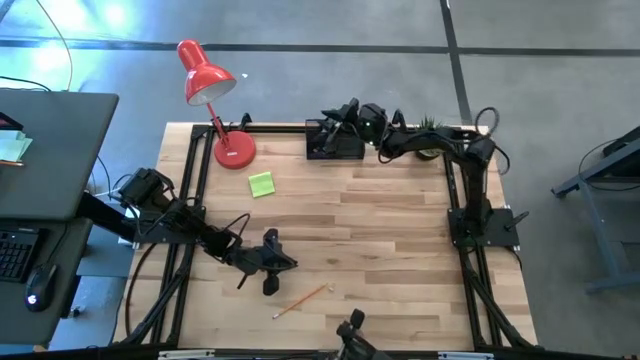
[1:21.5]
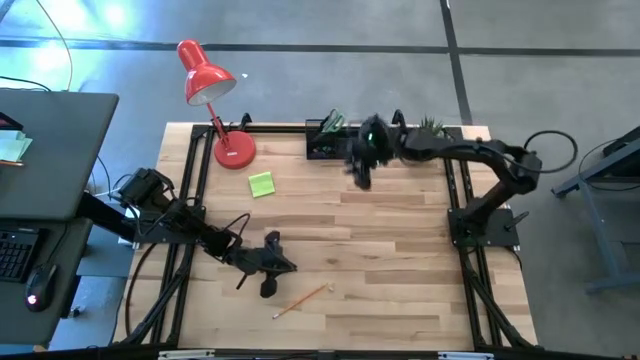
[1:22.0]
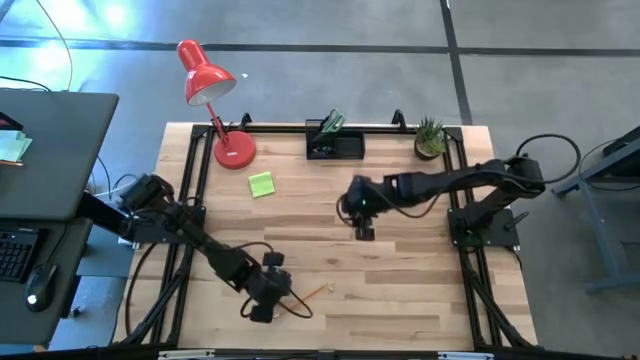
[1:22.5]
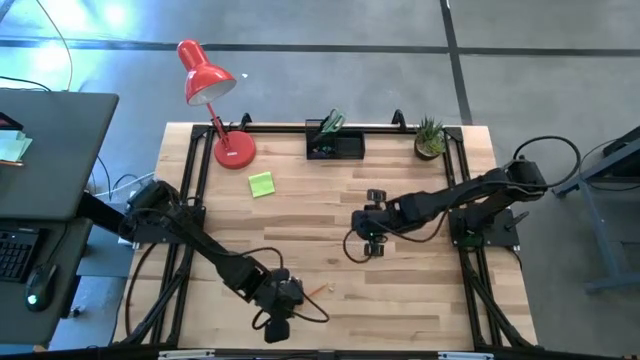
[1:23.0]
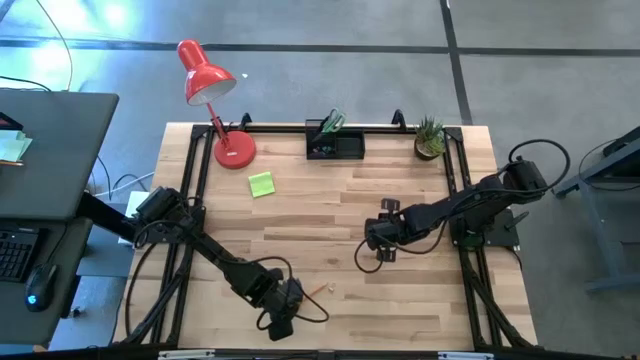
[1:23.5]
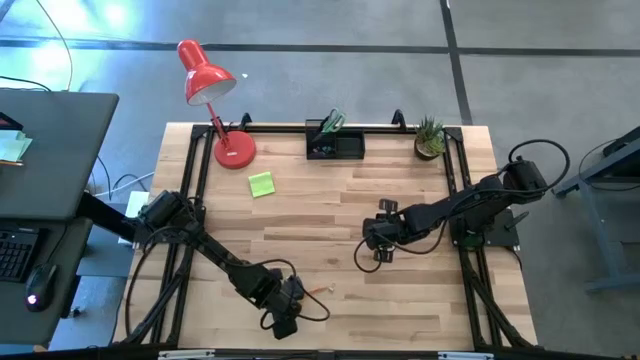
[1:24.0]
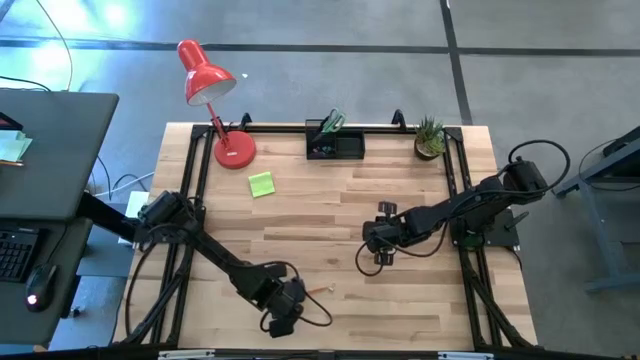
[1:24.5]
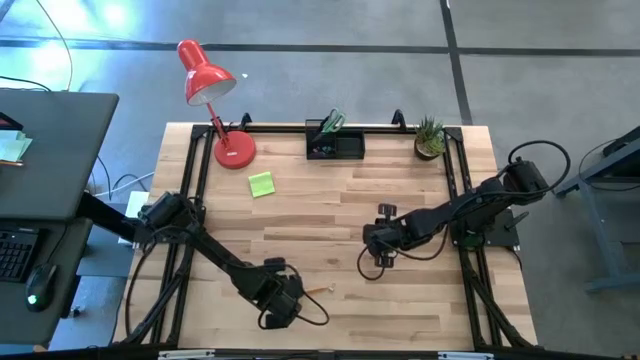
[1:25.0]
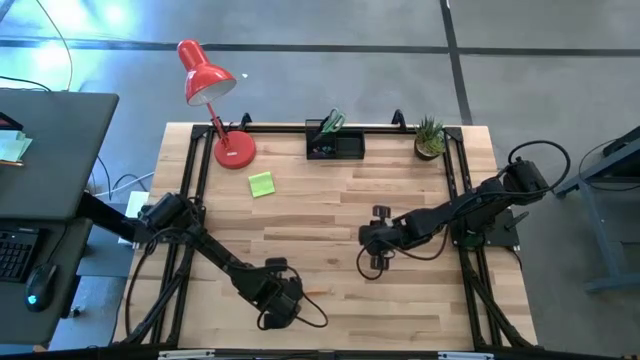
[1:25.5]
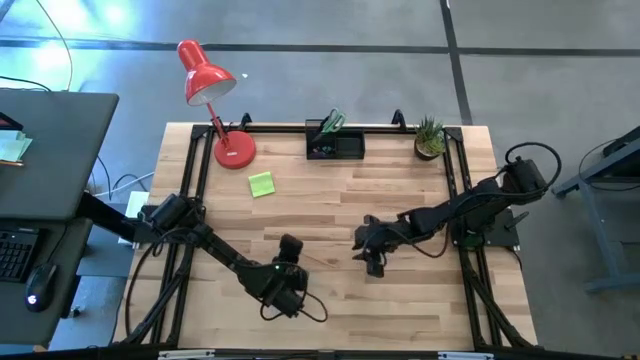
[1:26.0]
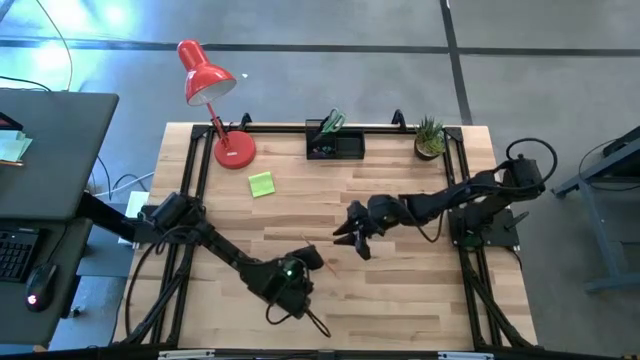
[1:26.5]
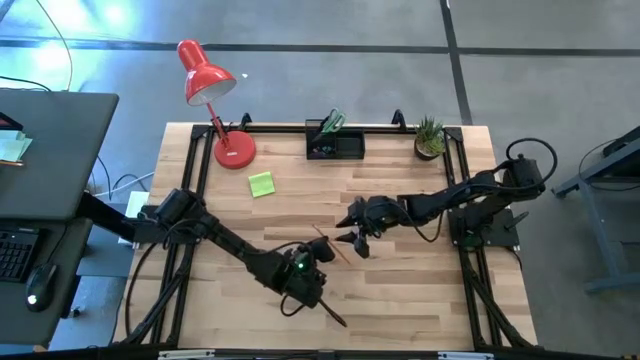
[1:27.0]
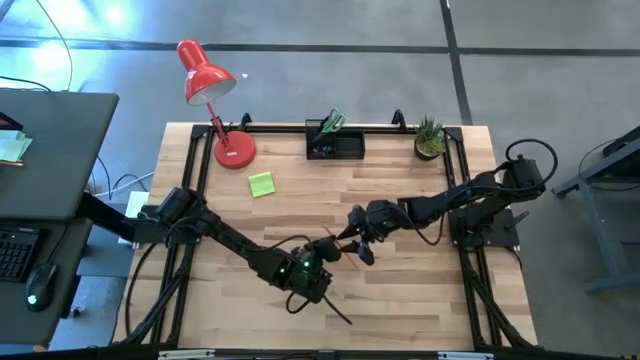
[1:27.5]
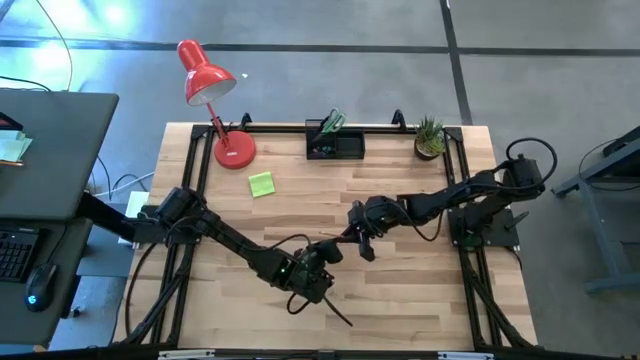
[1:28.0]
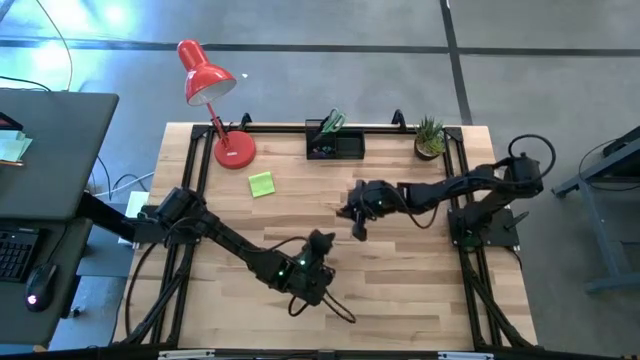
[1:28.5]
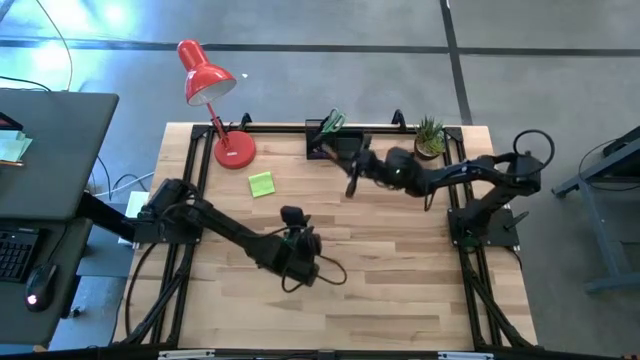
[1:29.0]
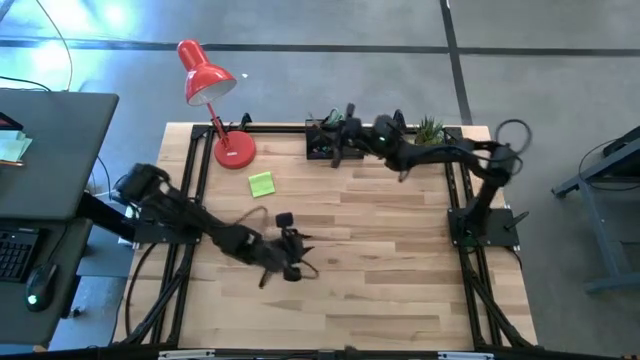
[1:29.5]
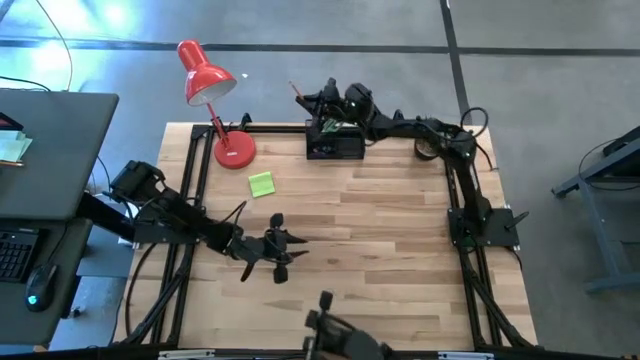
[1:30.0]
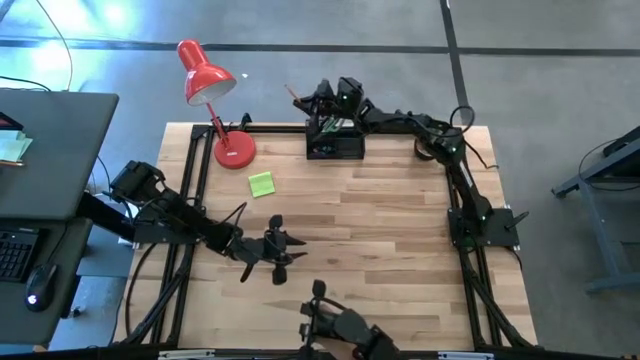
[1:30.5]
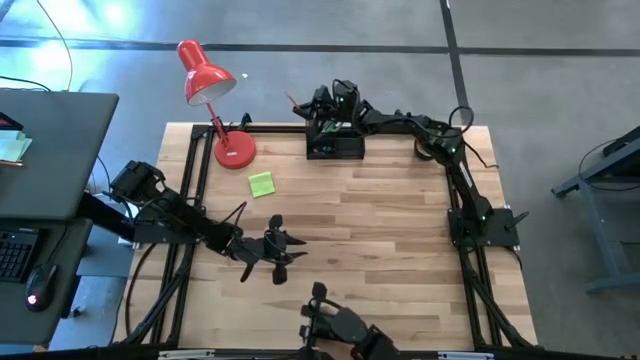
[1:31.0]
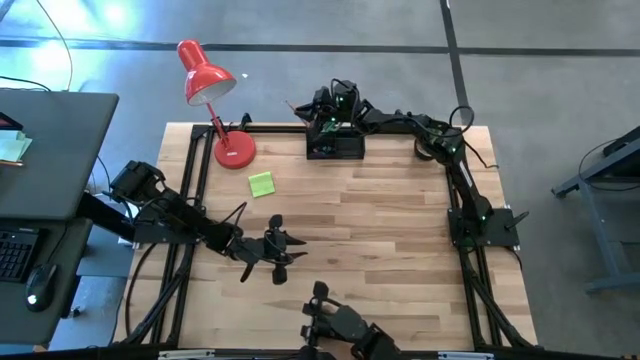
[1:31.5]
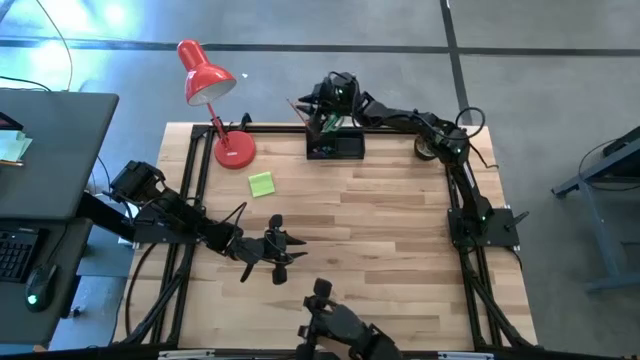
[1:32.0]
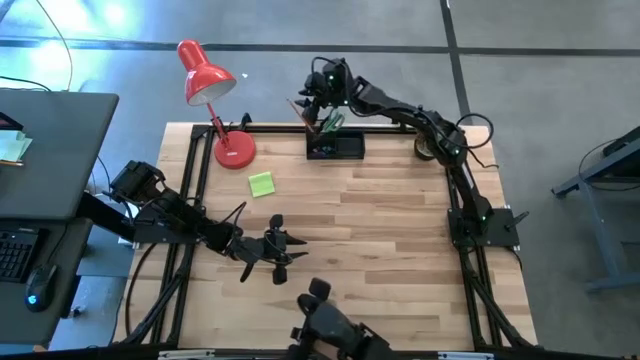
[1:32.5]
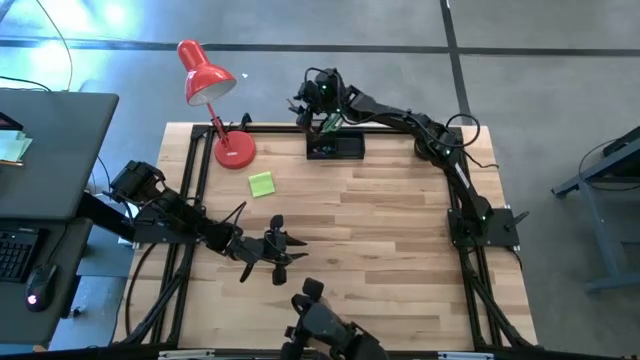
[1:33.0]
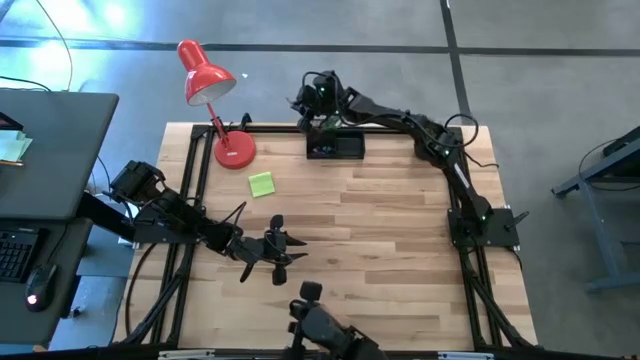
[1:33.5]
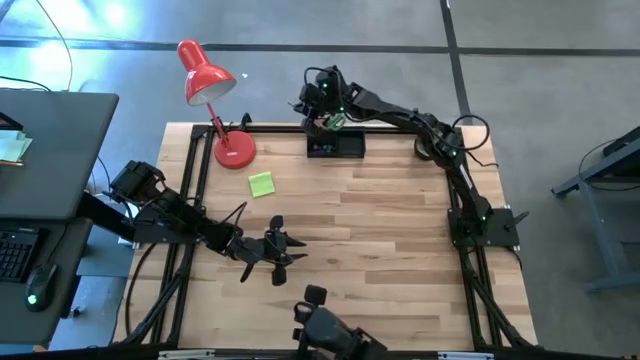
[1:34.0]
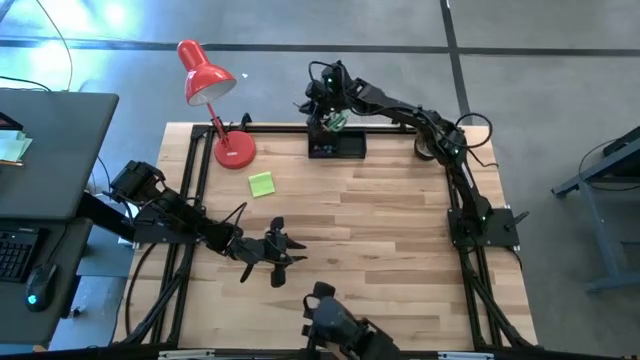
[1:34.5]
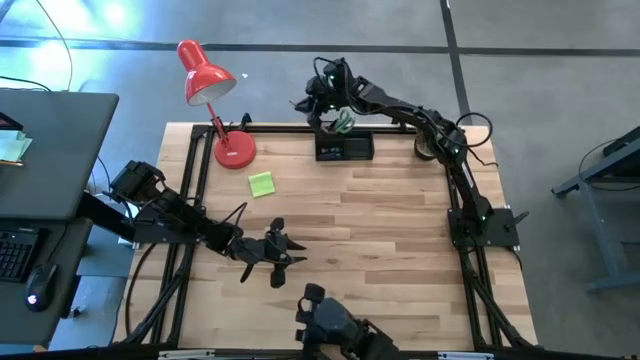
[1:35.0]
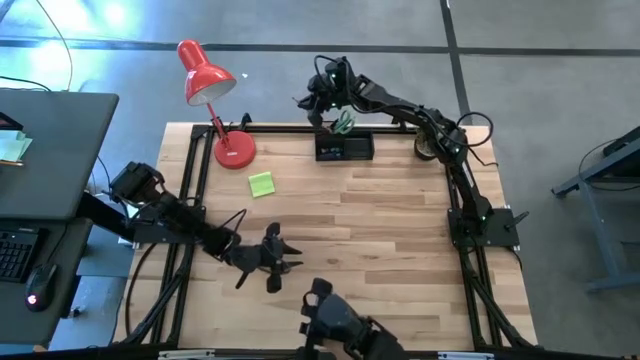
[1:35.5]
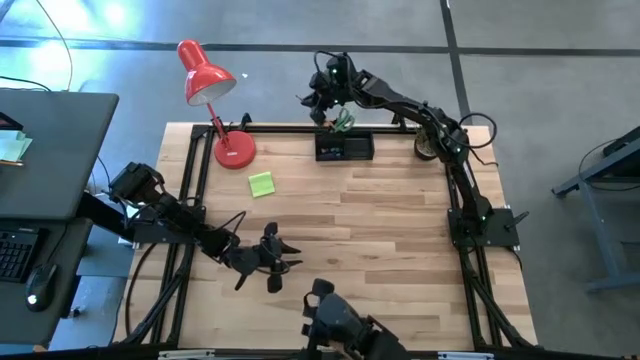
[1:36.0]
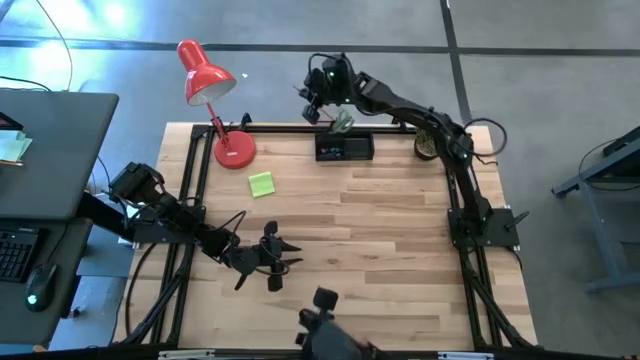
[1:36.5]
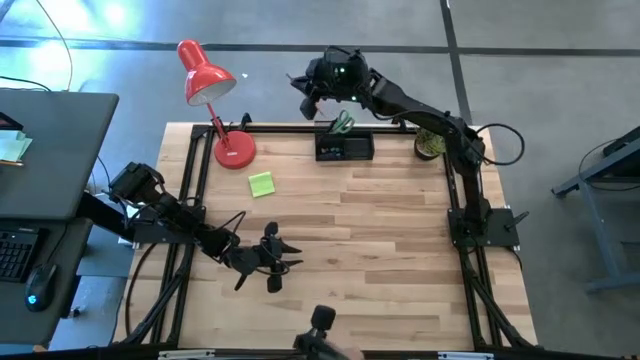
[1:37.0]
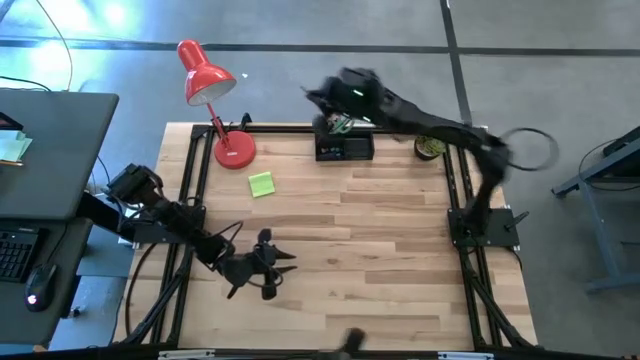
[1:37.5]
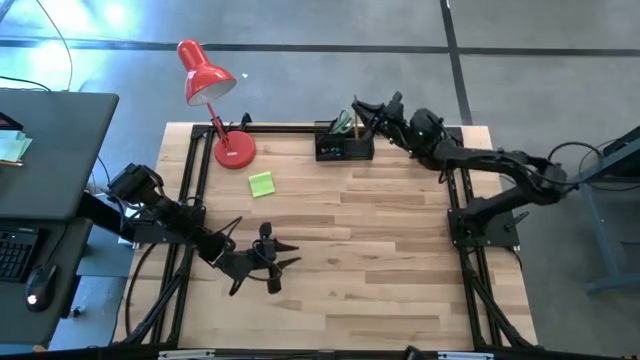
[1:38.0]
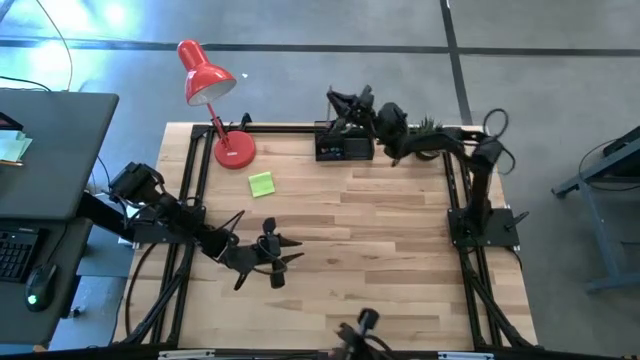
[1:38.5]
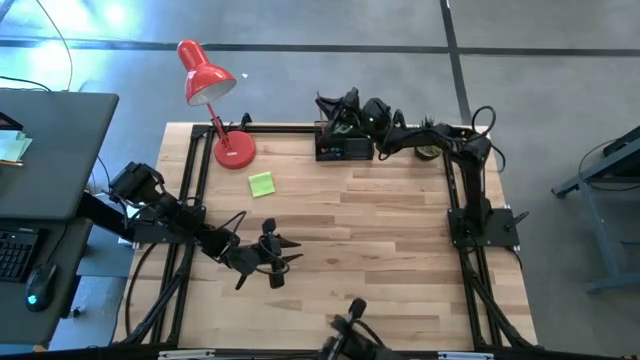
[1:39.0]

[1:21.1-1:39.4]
Task: Pick and place office supplies into organizer
Put the pencil into the desk organizer

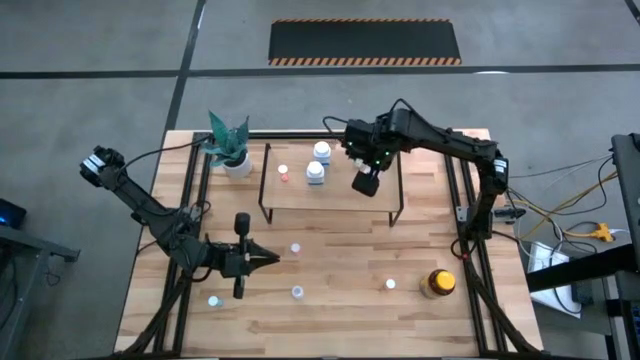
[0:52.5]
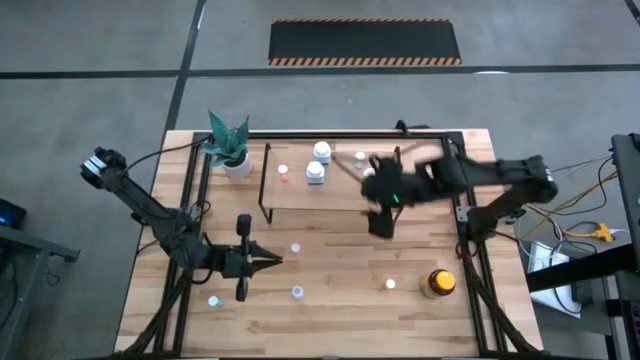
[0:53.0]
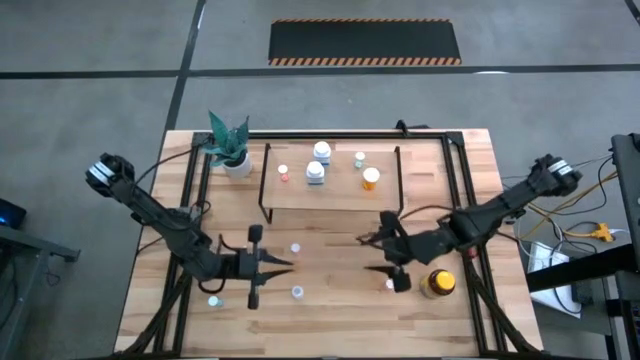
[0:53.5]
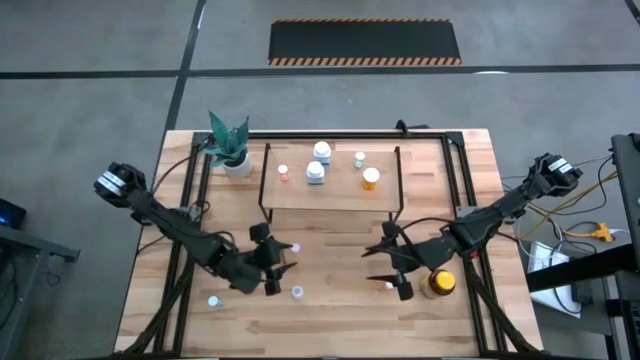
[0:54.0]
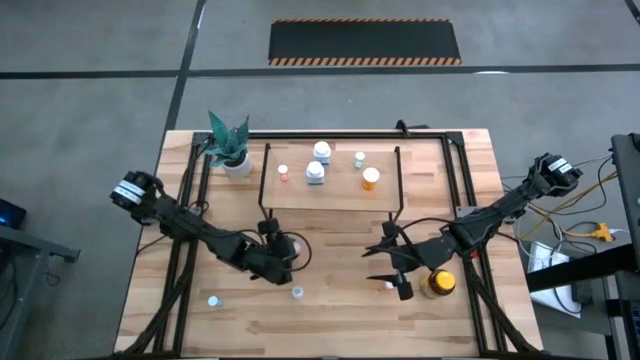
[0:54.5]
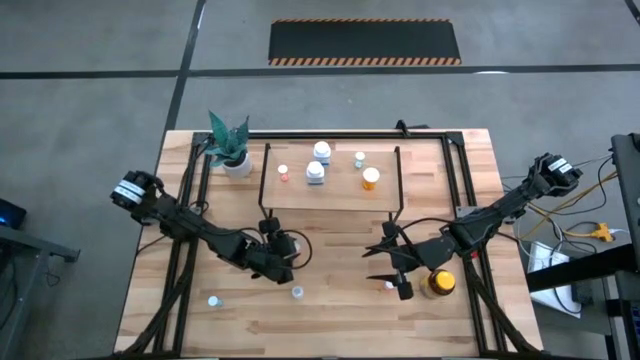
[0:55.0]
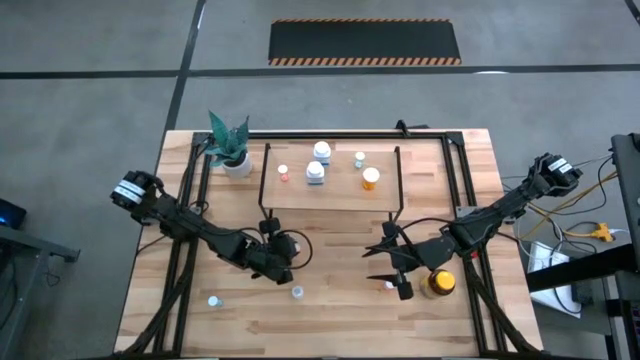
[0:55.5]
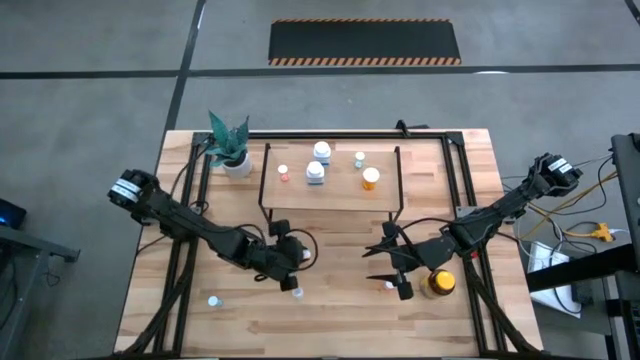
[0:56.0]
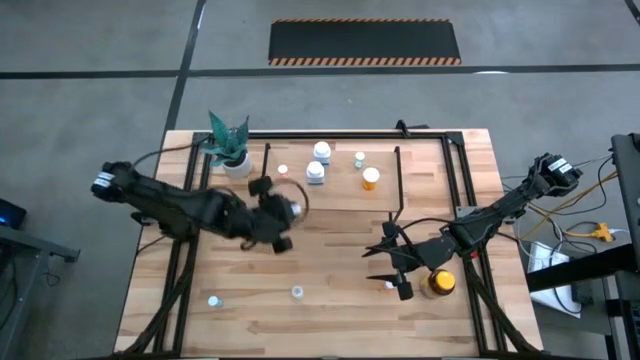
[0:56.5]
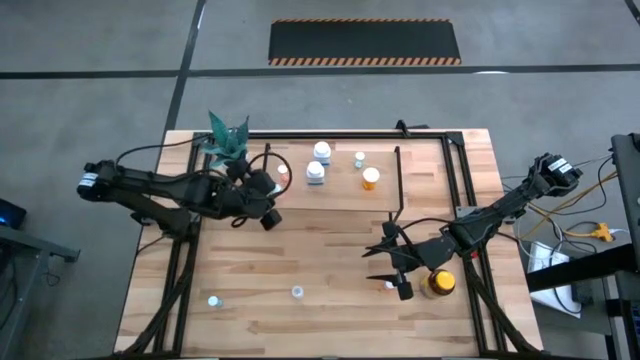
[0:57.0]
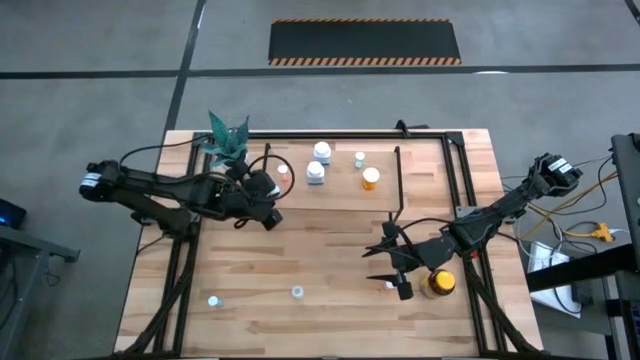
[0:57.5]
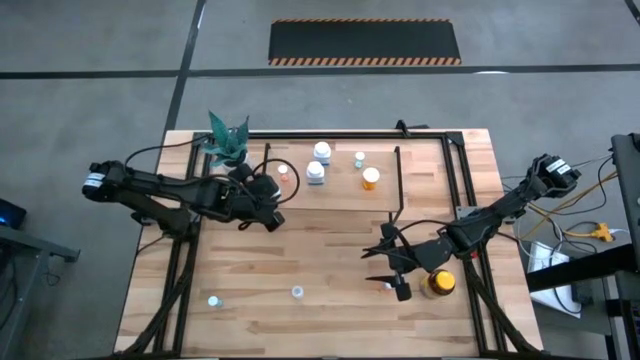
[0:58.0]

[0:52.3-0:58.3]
Task: Pick and place medicine bottles onto shelf by color
Put the top pink pill bottle on the shelf
